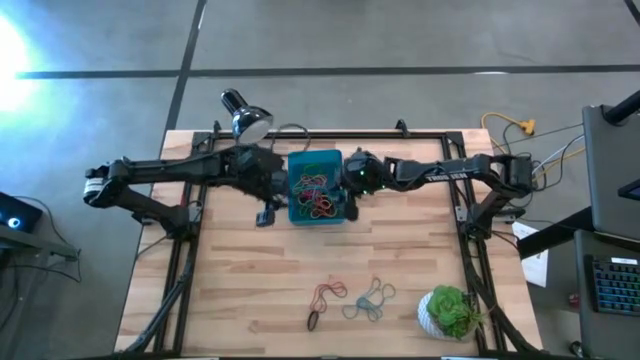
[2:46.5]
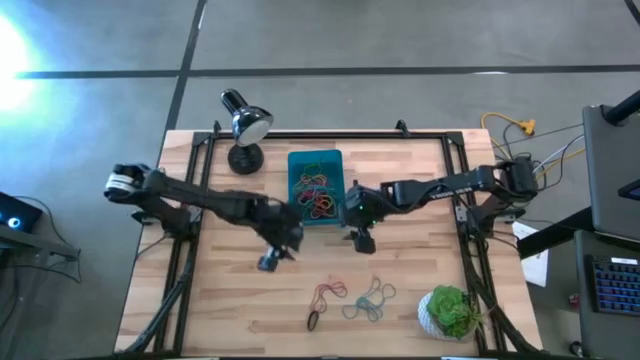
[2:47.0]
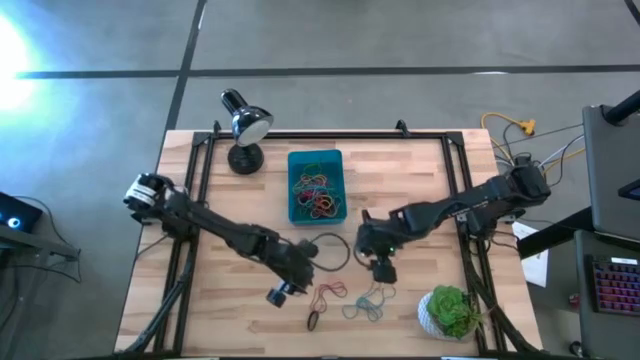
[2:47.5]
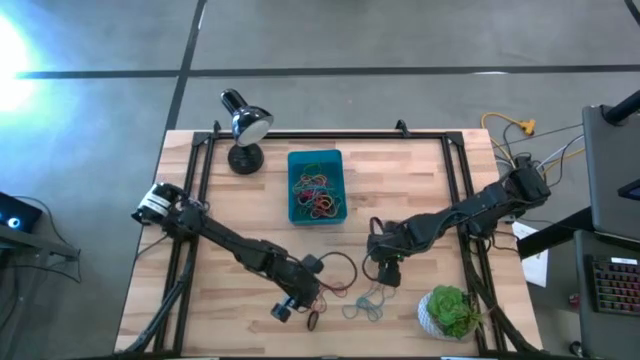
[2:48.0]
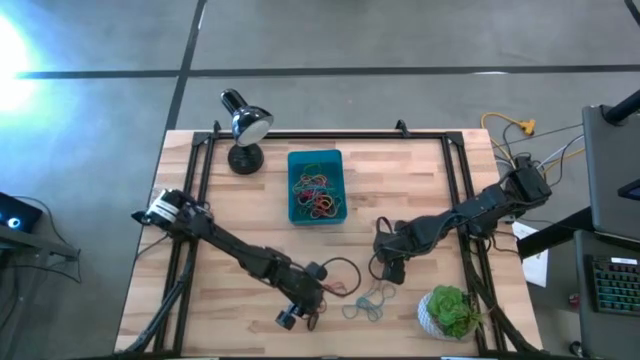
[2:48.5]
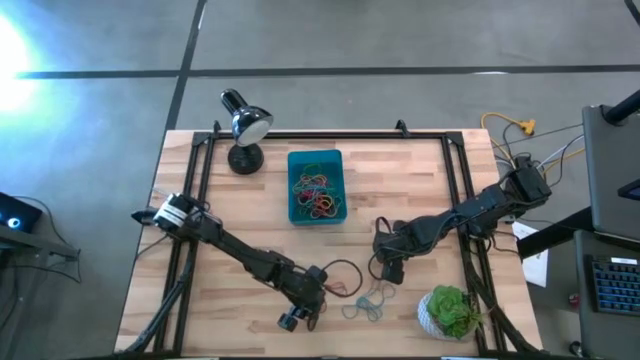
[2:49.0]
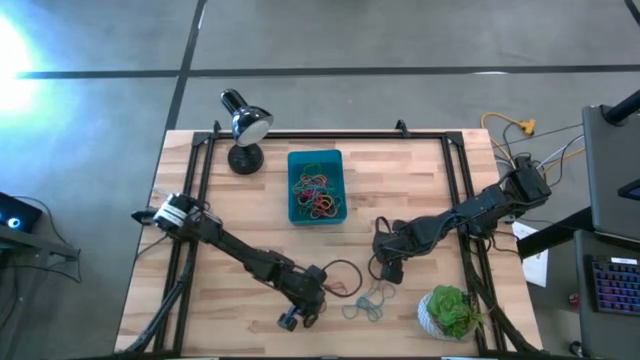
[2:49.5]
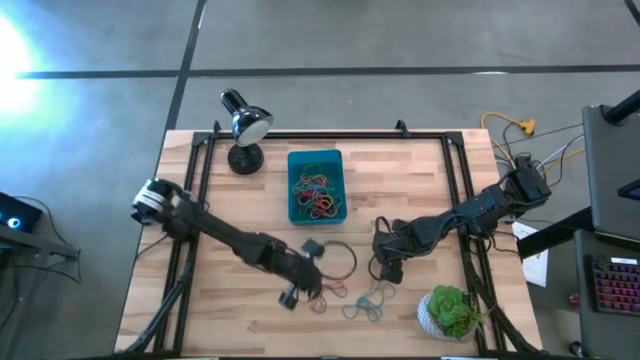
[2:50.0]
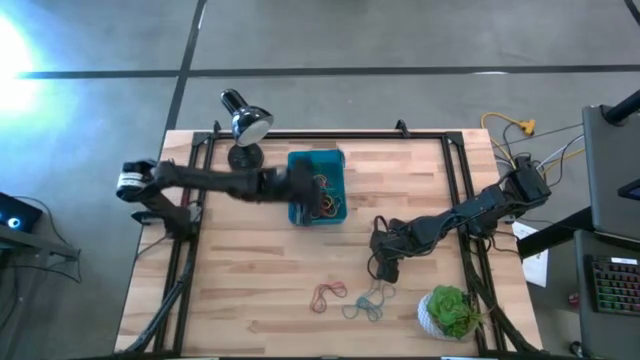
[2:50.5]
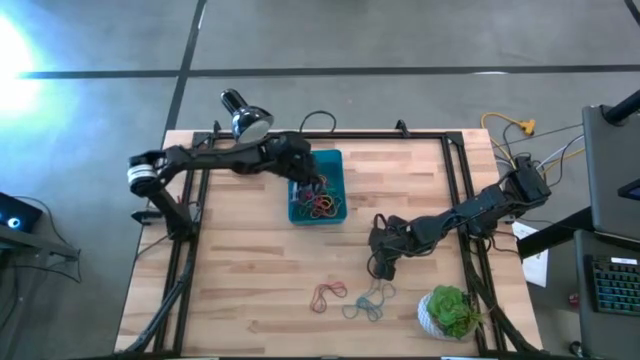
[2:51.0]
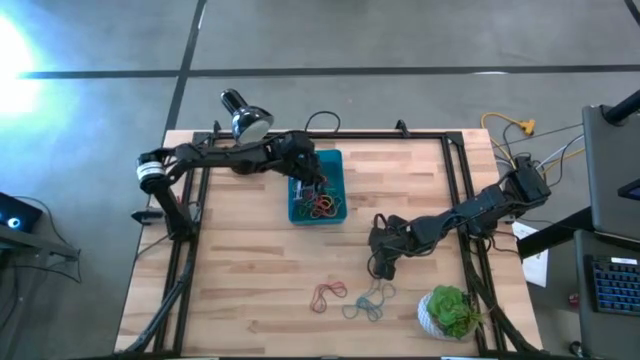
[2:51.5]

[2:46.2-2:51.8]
Task: Pick and place rubber bands into bin
Put the black rubber band into the blue bin

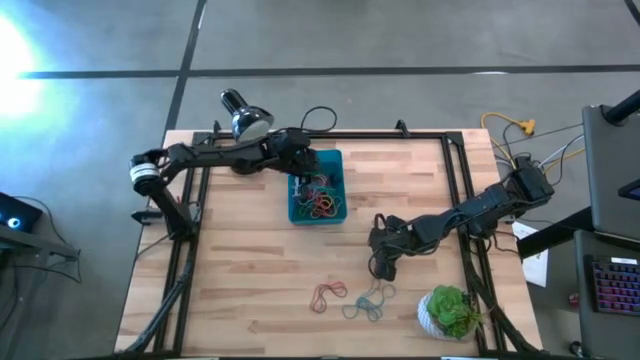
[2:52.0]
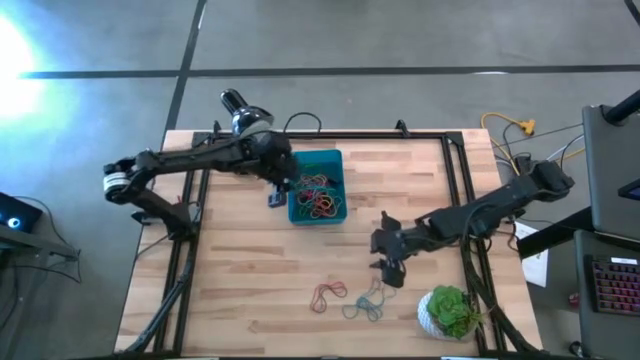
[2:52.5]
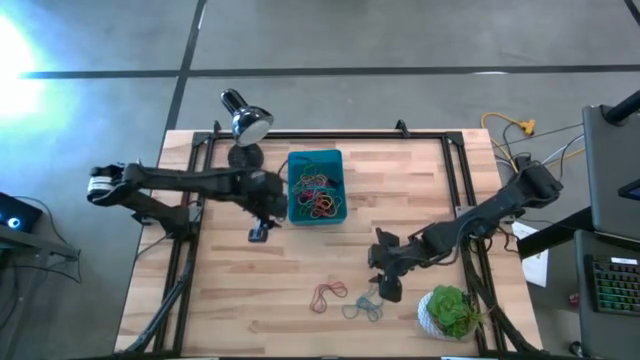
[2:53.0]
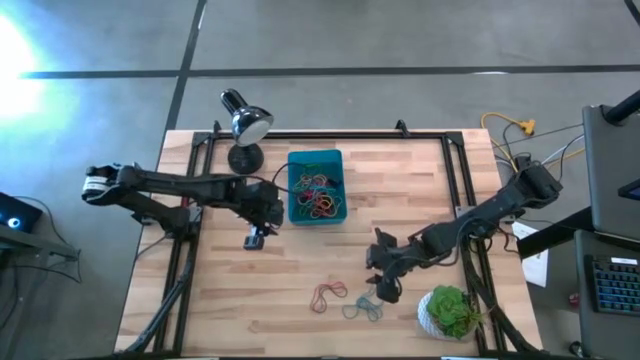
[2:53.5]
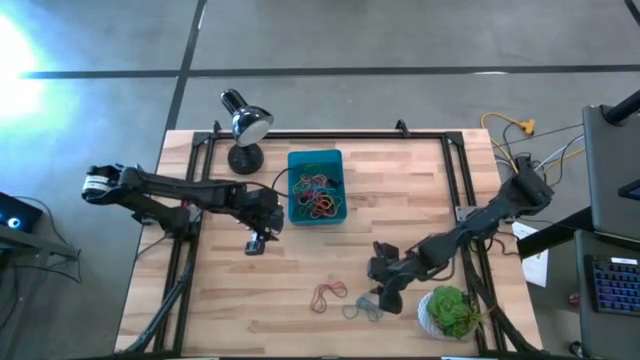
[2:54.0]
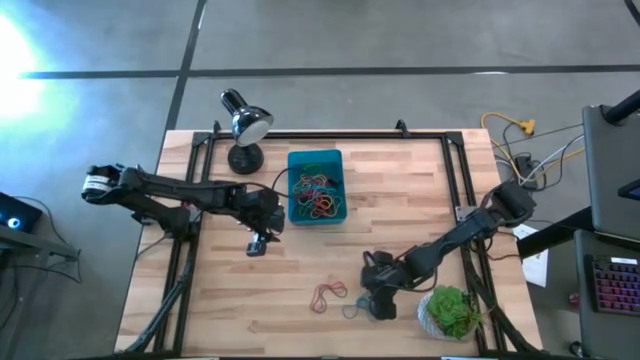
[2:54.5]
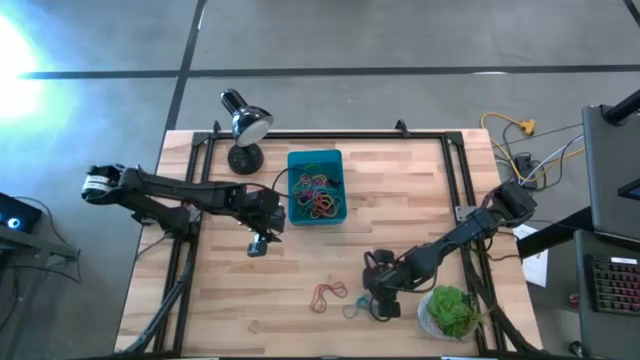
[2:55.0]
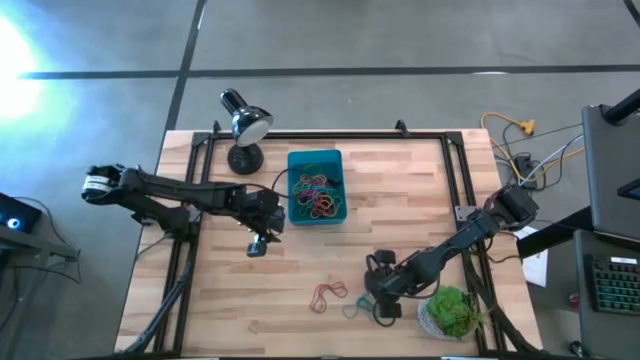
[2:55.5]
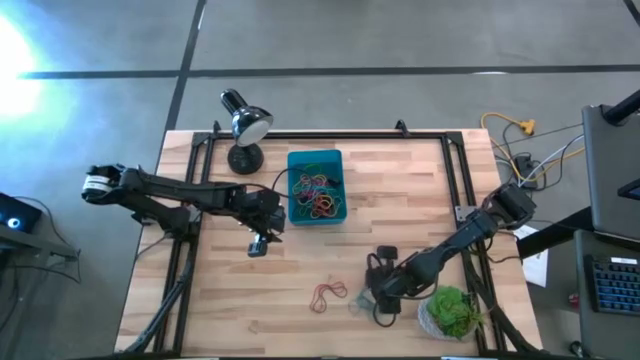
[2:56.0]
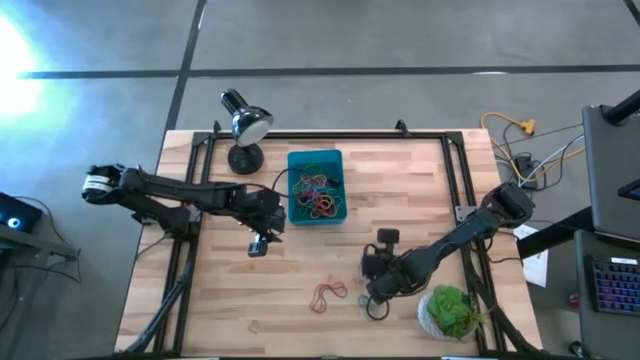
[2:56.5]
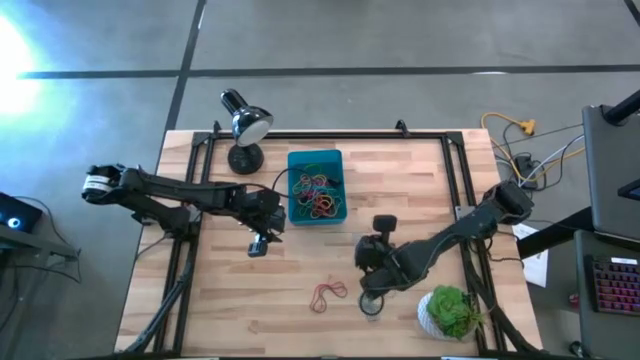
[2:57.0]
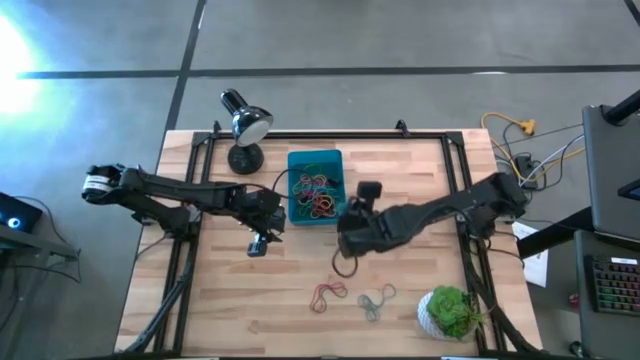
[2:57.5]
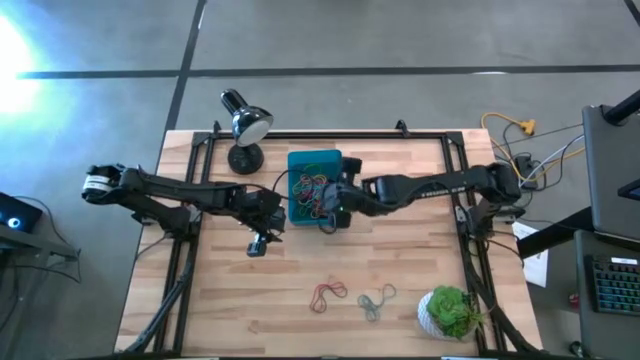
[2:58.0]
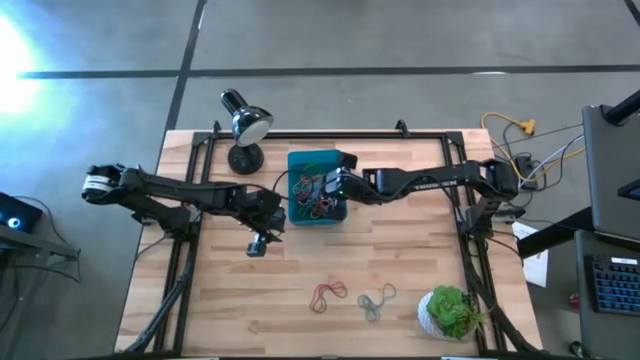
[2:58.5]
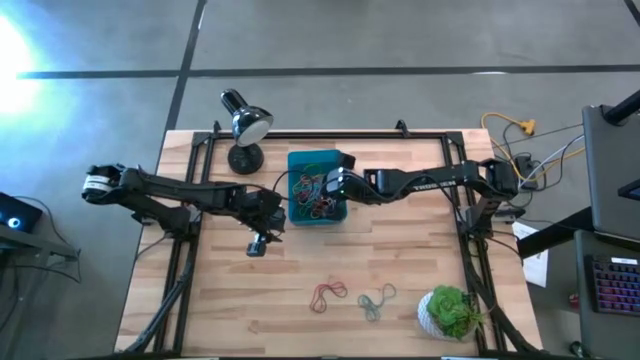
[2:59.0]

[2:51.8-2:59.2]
Put the blue rubber band into the blue bin

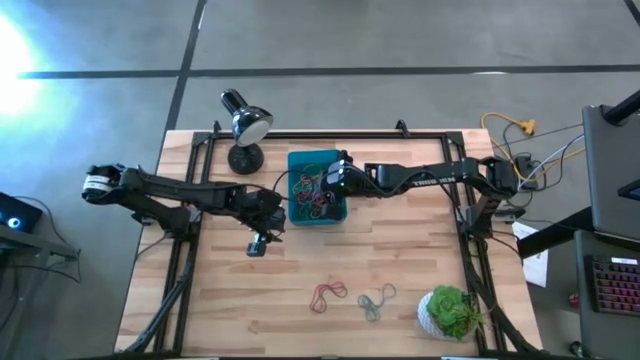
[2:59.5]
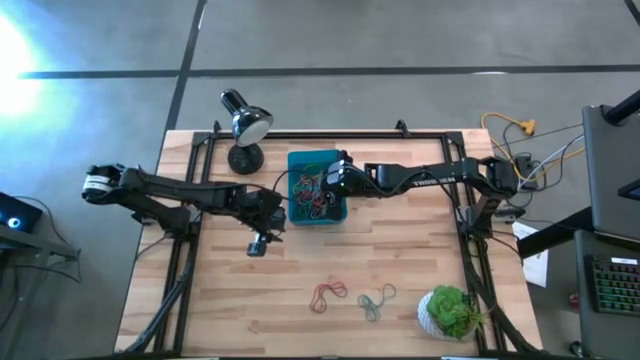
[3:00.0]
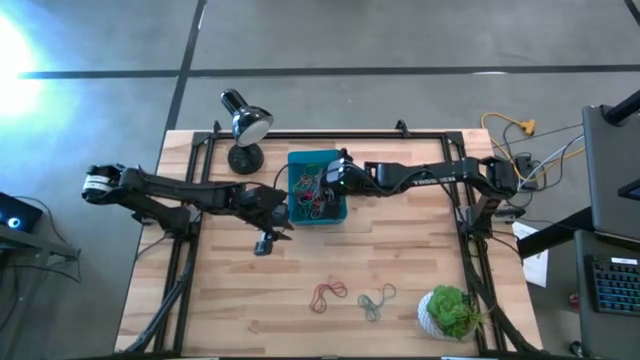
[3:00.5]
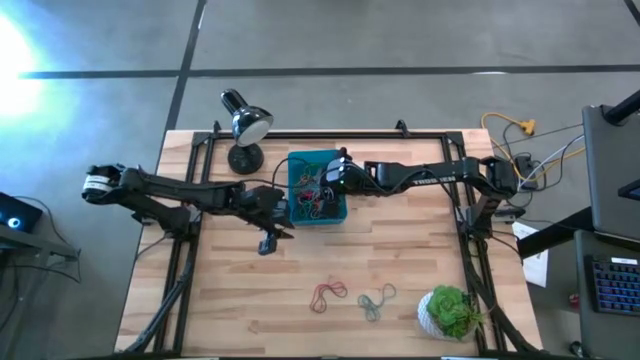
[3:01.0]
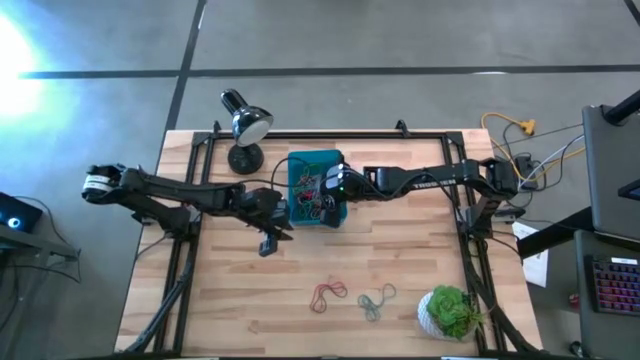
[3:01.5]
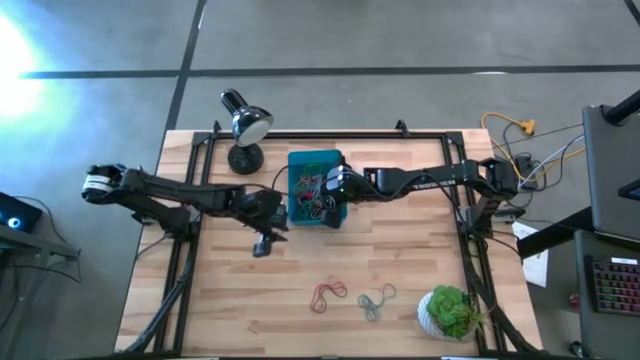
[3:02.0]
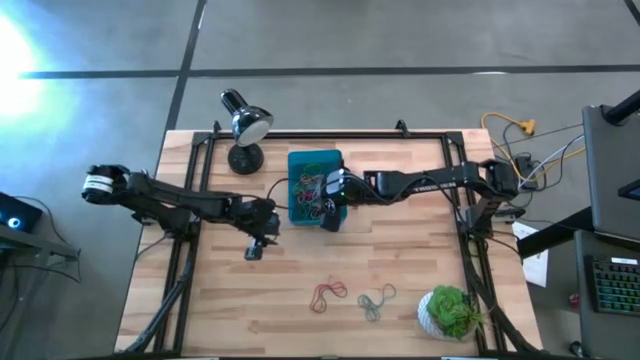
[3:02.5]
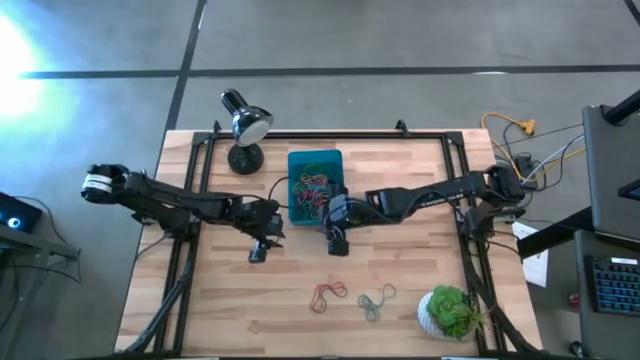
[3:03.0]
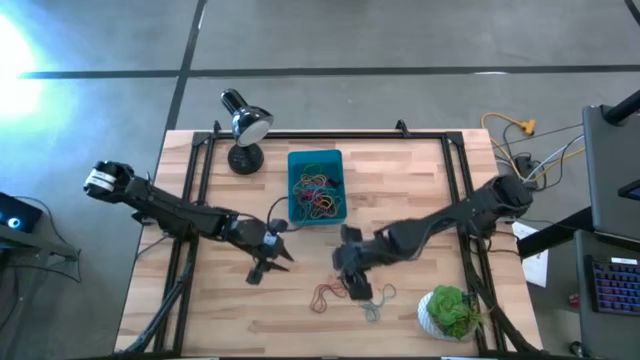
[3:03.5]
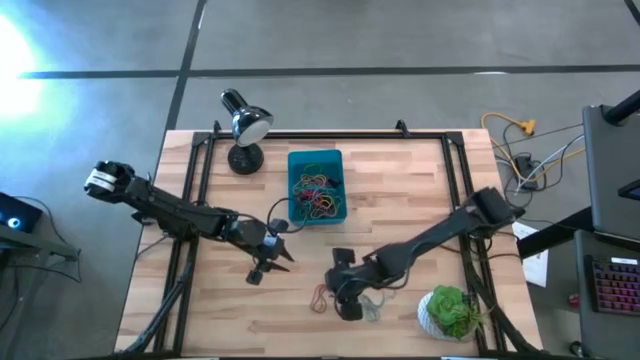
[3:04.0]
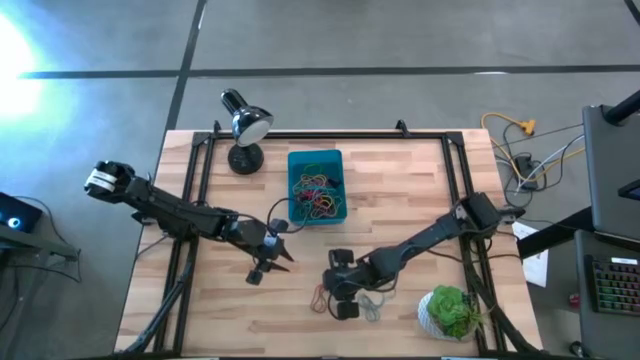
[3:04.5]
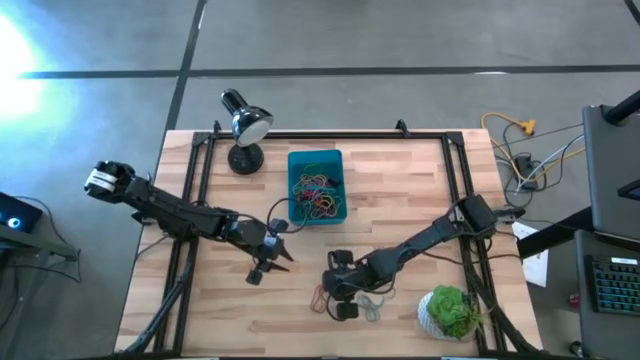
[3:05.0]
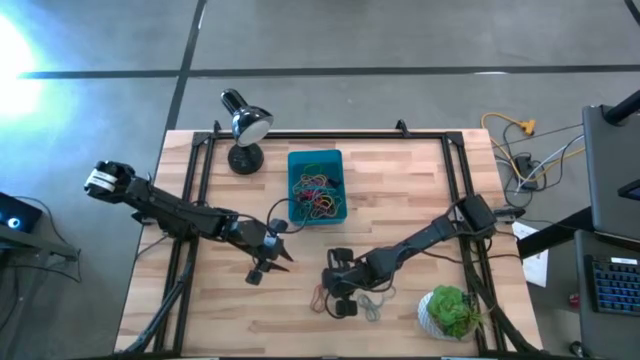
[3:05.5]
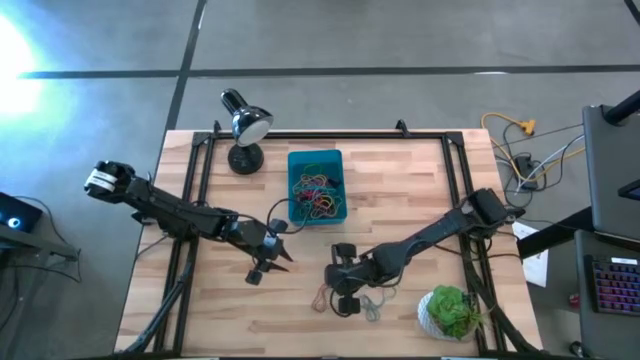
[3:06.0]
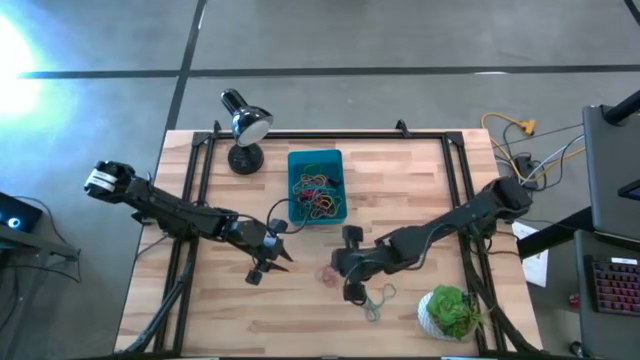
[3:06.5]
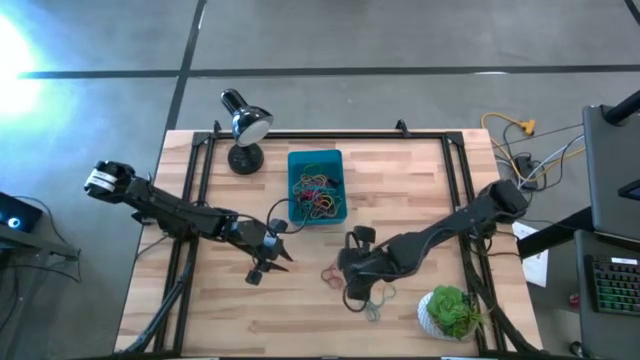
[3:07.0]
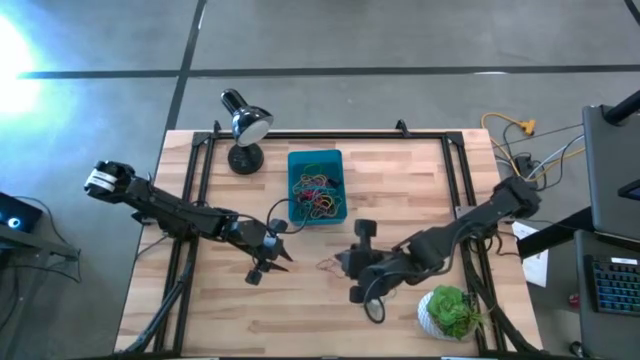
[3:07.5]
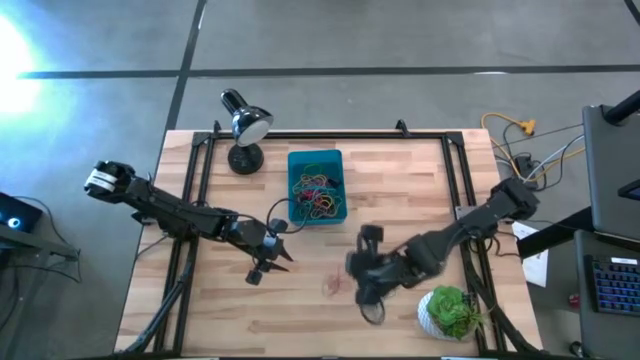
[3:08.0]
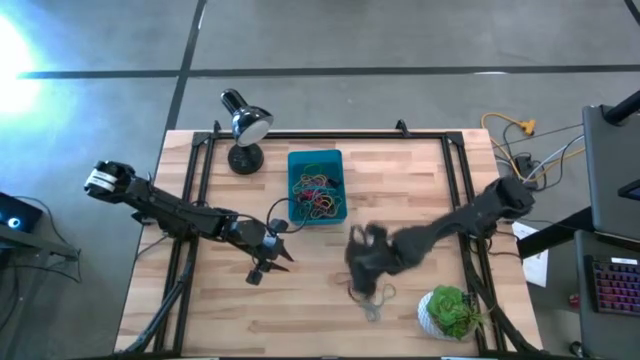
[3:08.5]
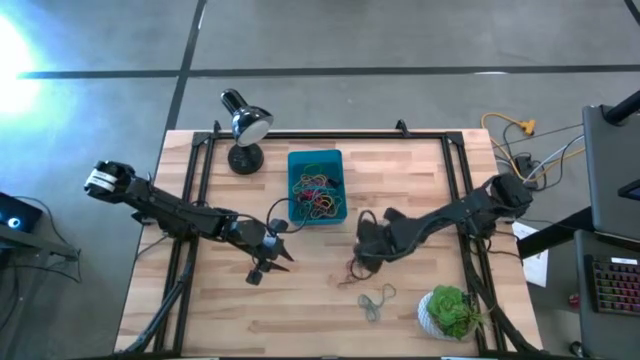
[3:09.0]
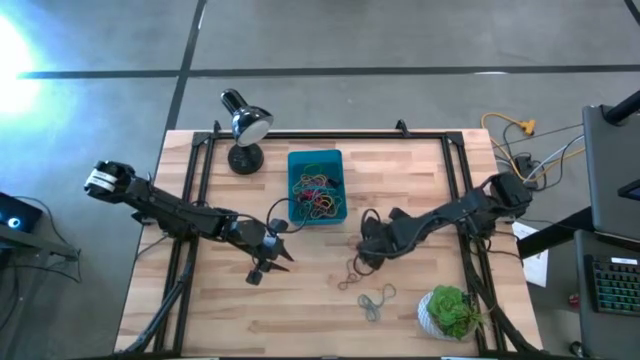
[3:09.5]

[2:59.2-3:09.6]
Put the red rubber band into the blue bin
